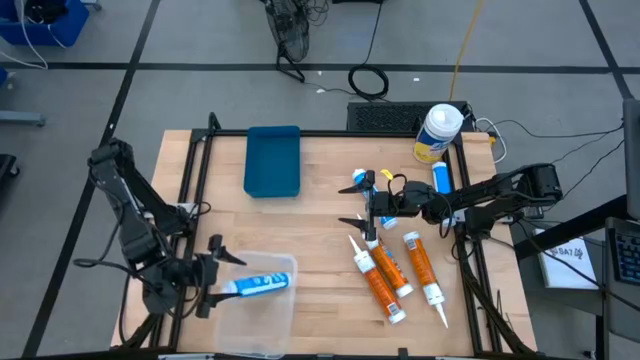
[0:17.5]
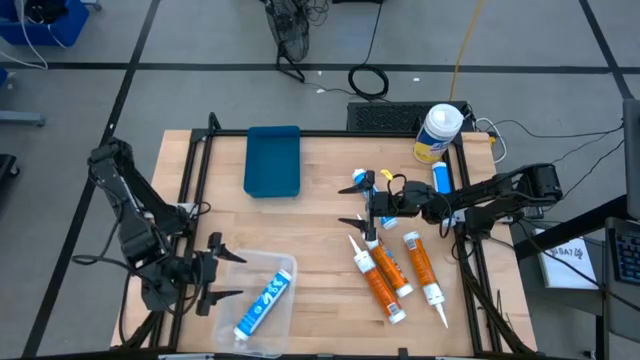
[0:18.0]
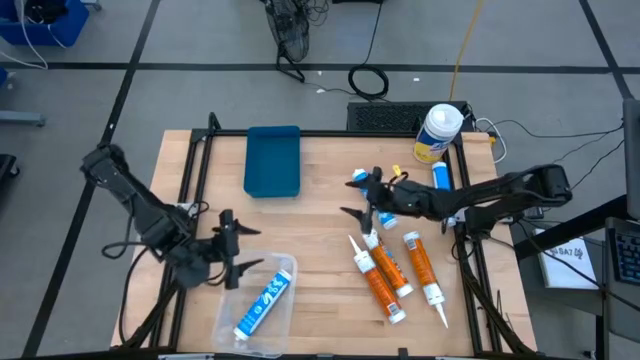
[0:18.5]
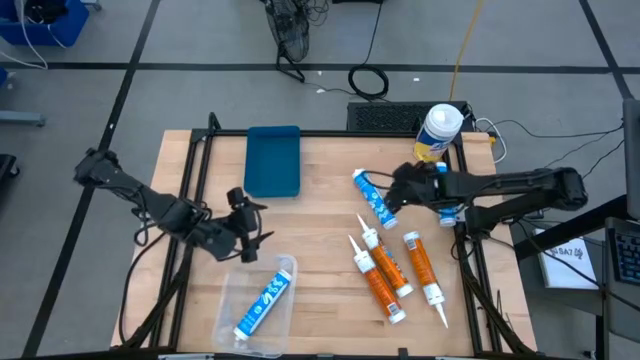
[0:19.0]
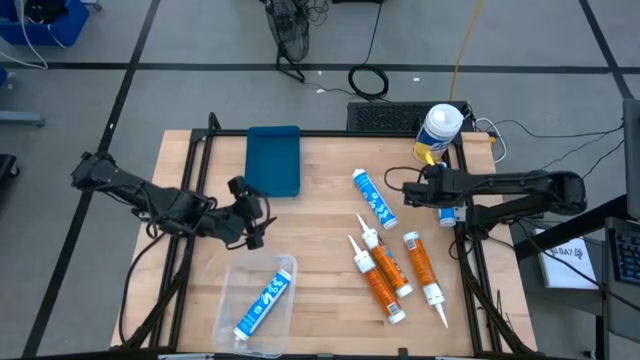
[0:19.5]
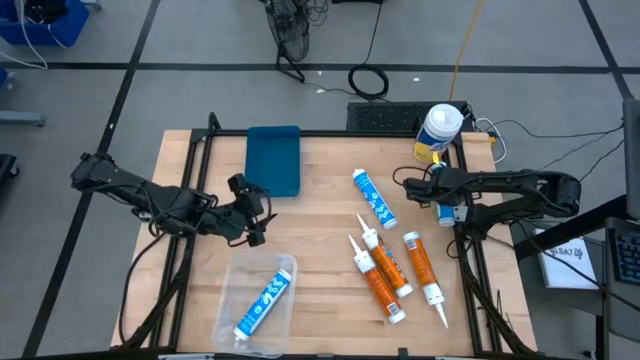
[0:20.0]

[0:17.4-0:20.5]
Task: Pick & place silicon tubes, Sealant and Lysol wipes
Adjust the right blue sealant

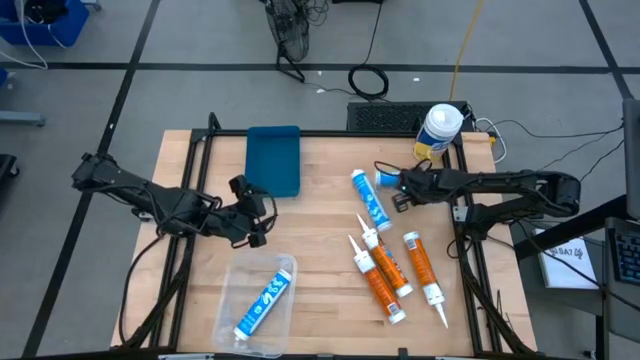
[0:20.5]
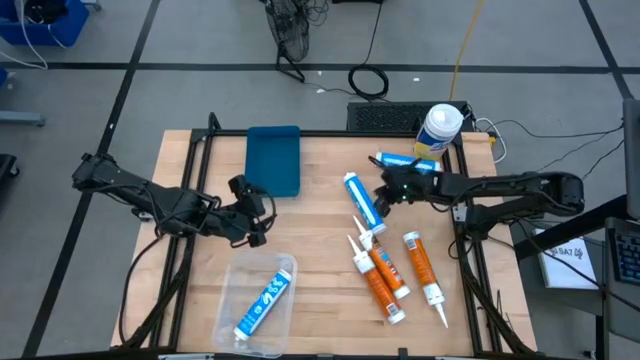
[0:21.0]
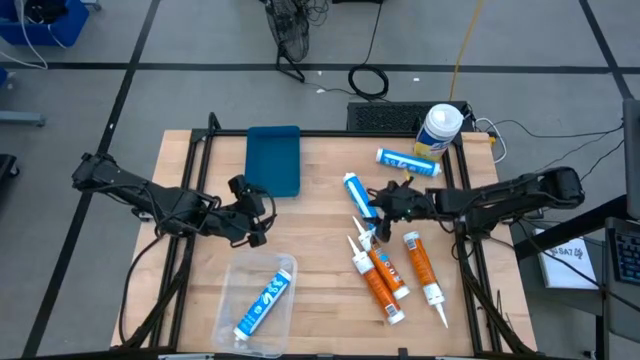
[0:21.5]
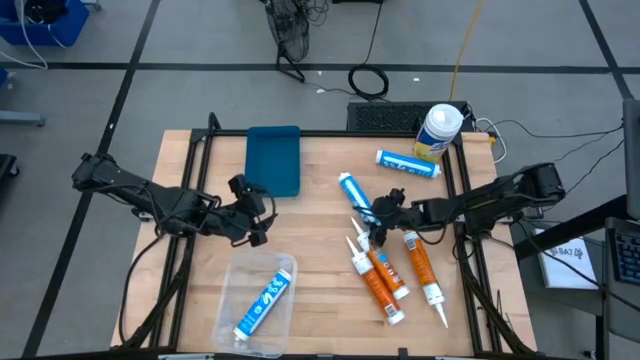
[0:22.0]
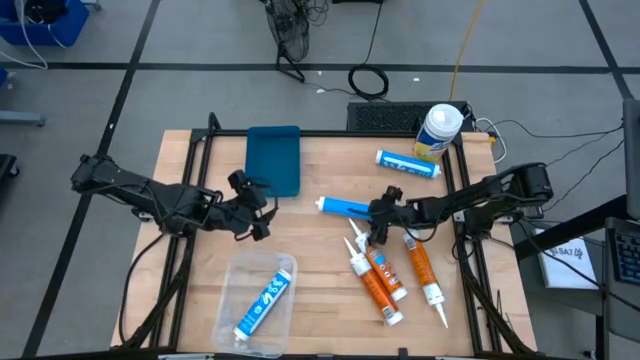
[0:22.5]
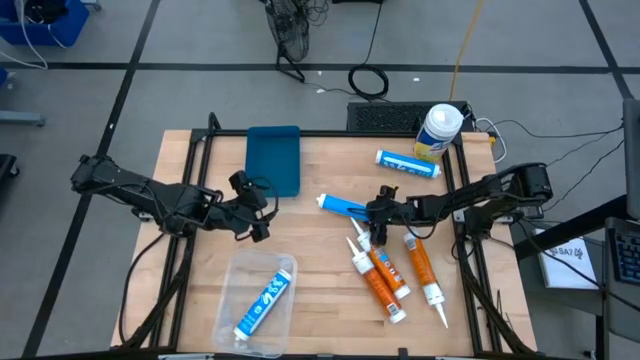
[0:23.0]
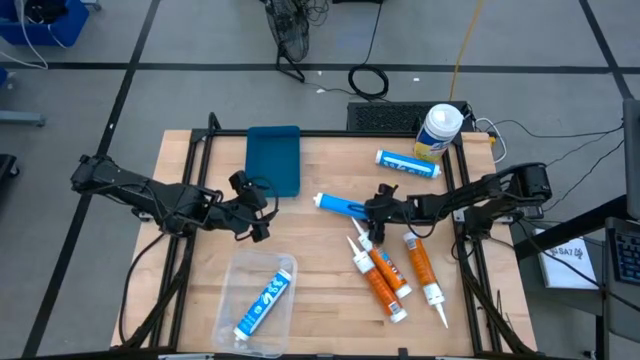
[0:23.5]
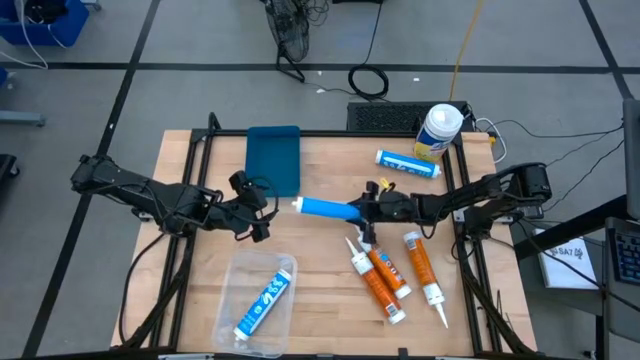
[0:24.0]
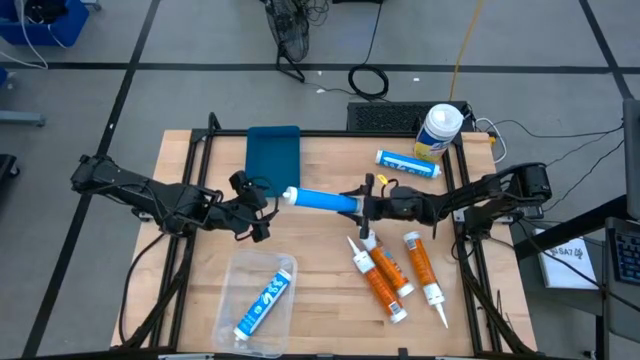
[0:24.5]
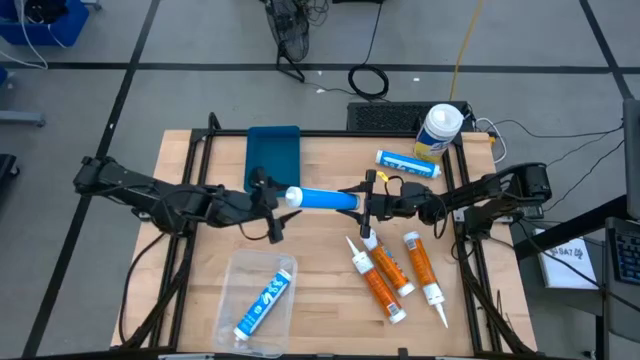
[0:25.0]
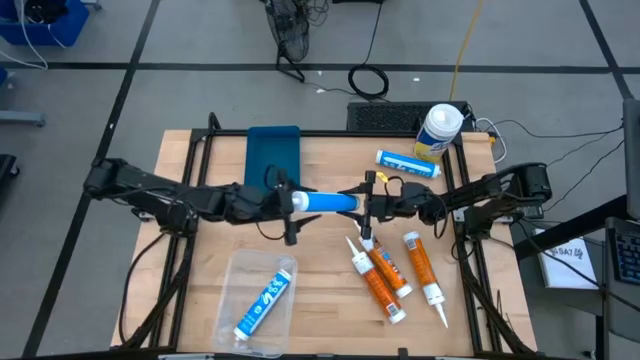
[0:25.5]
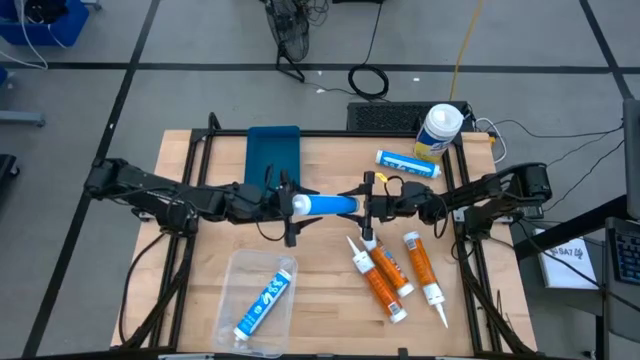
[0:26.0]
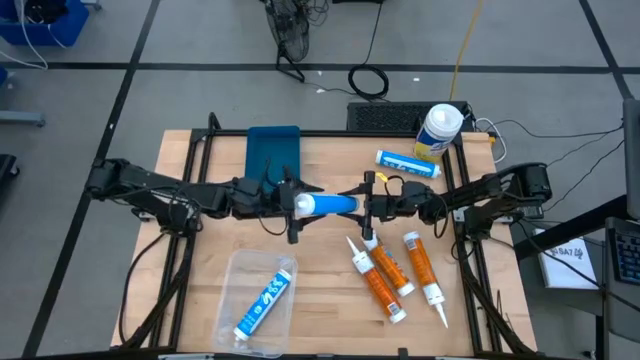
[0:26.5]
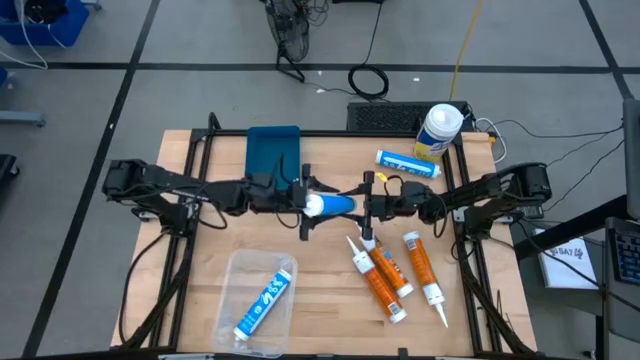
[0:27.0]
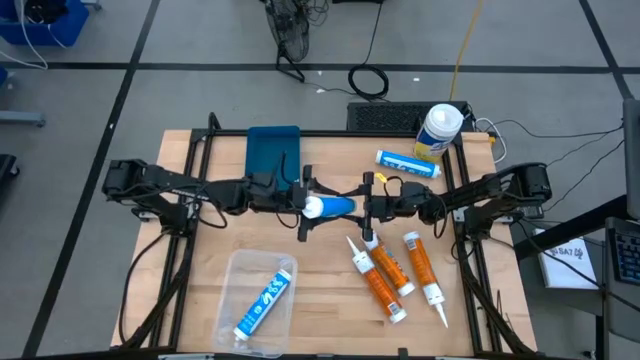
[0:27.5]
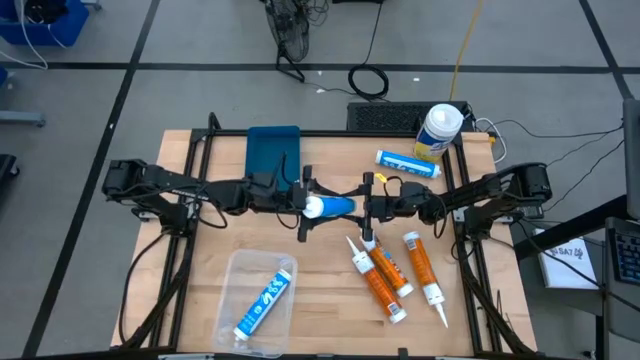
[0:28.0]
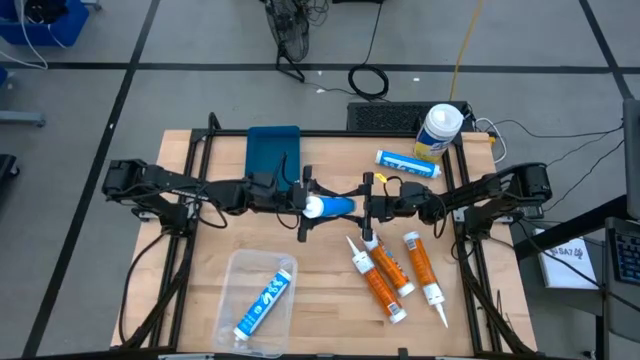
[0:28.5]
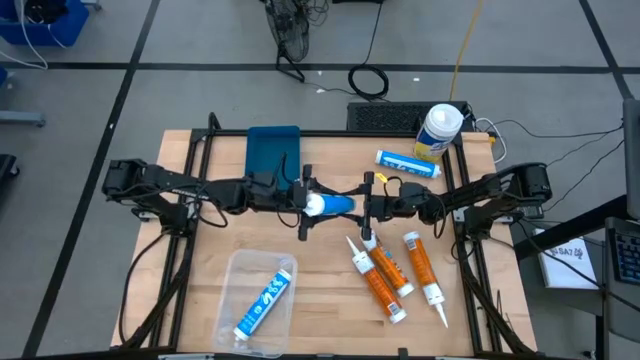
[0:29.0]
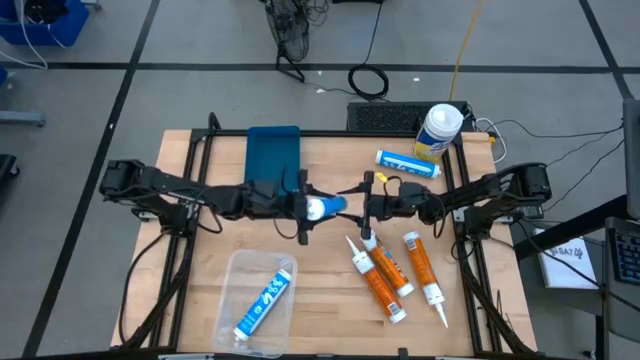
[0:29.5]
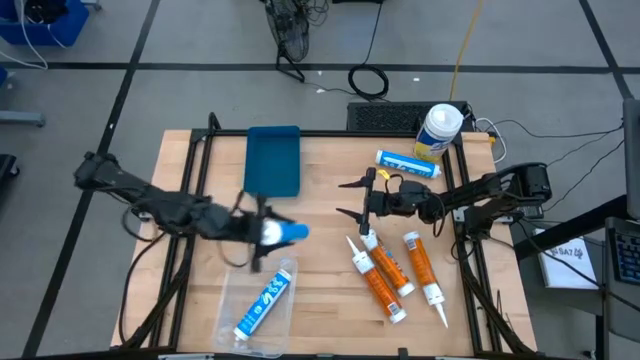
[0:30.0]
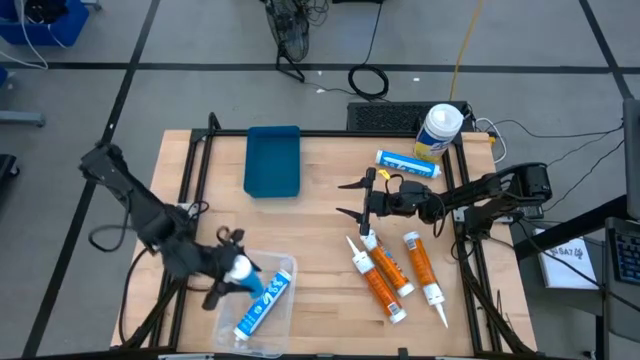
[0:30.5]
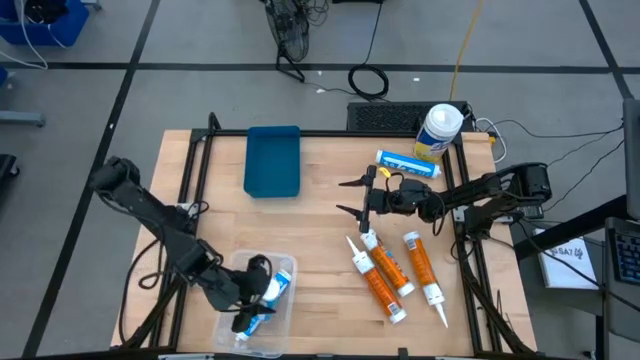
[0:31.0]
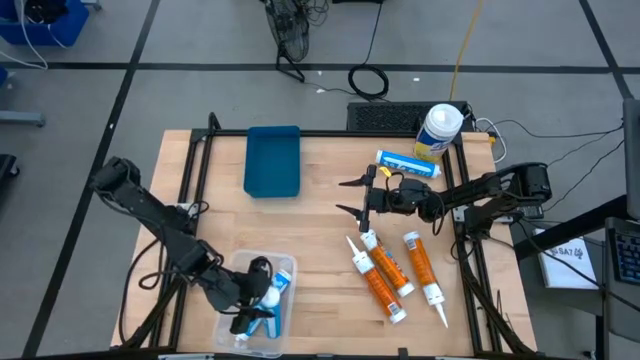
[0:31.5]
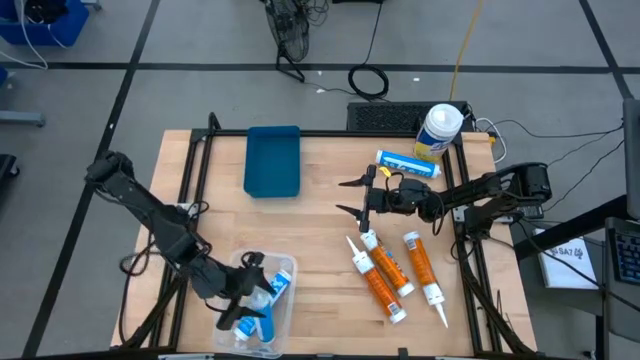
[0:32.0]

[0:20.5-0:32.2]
Put the bottom blue sealant into the transparent bin

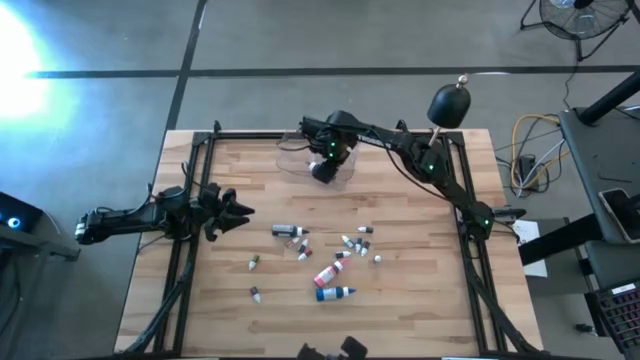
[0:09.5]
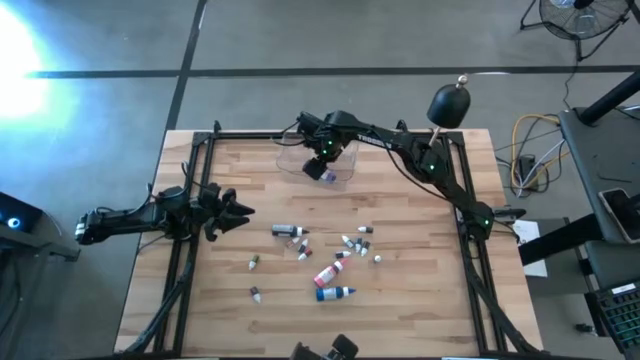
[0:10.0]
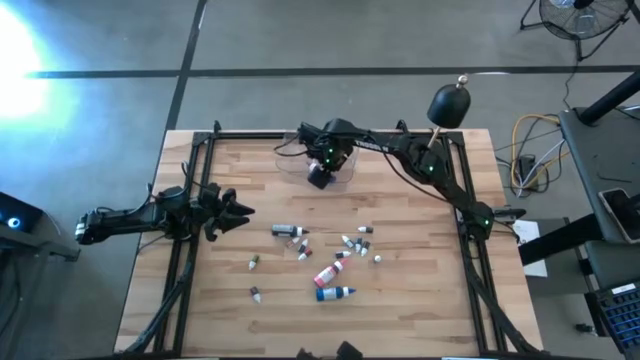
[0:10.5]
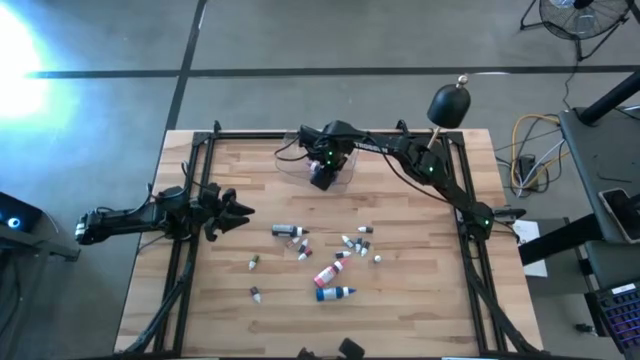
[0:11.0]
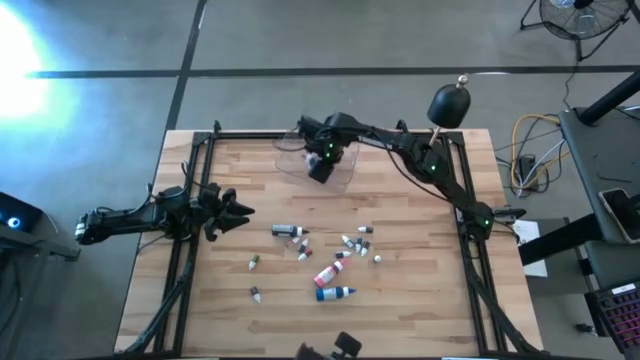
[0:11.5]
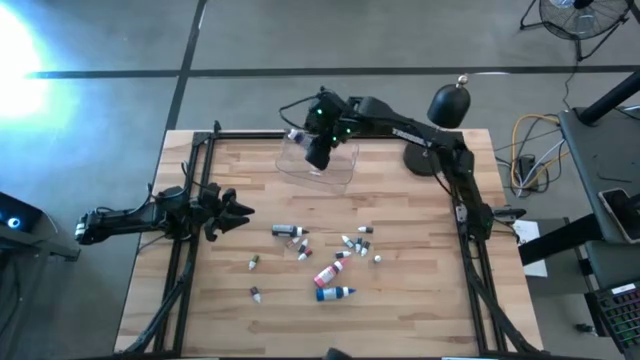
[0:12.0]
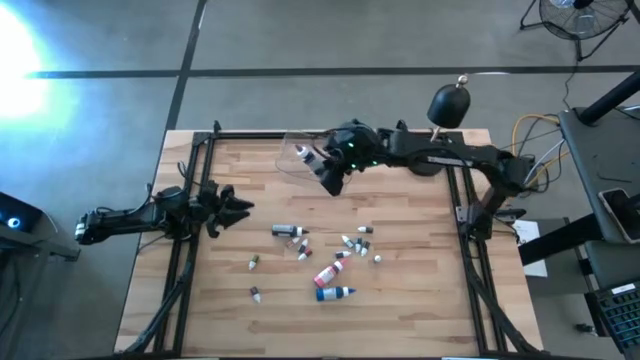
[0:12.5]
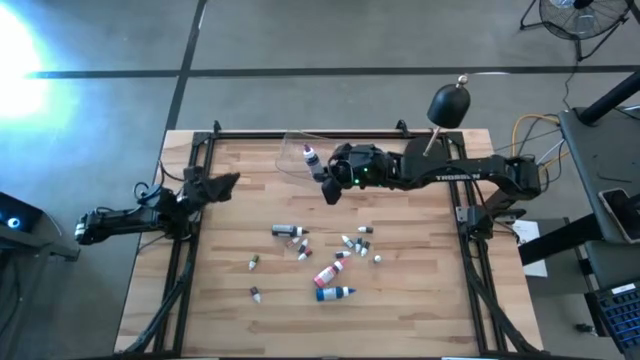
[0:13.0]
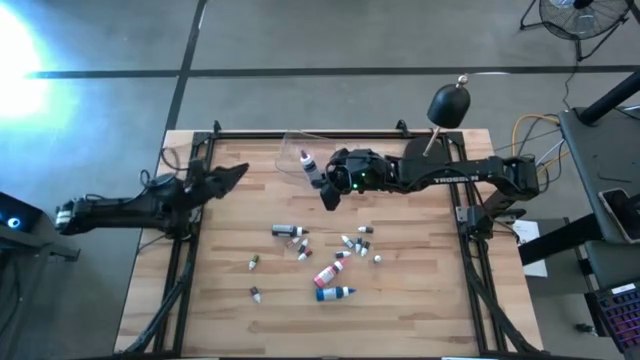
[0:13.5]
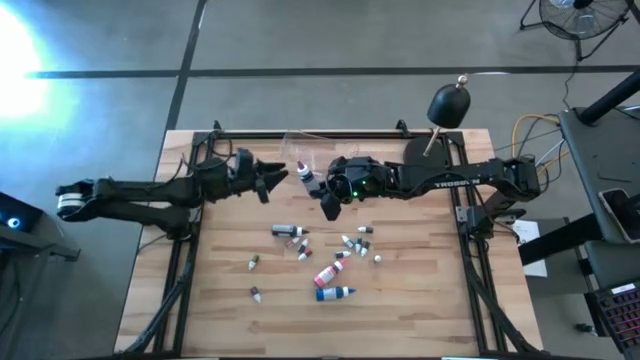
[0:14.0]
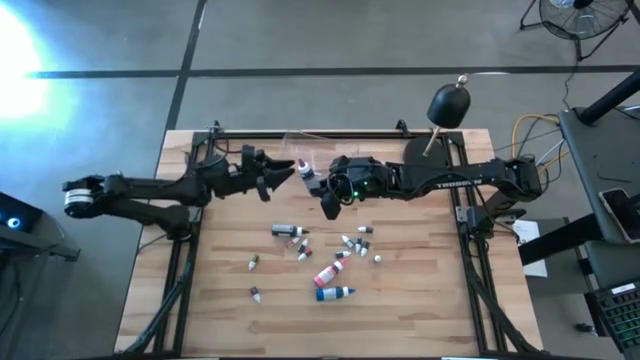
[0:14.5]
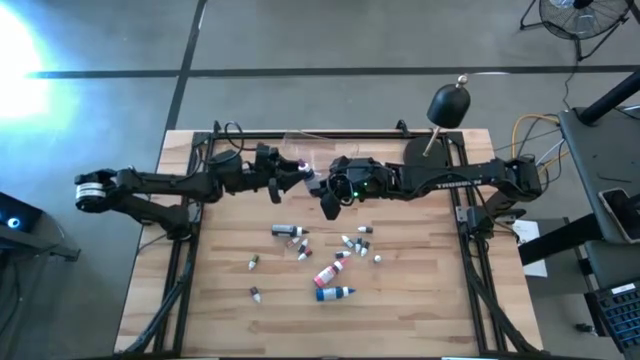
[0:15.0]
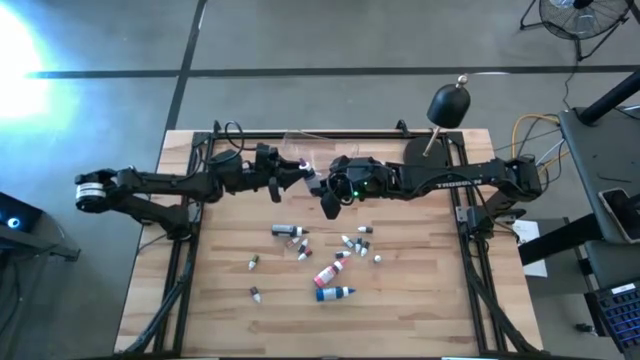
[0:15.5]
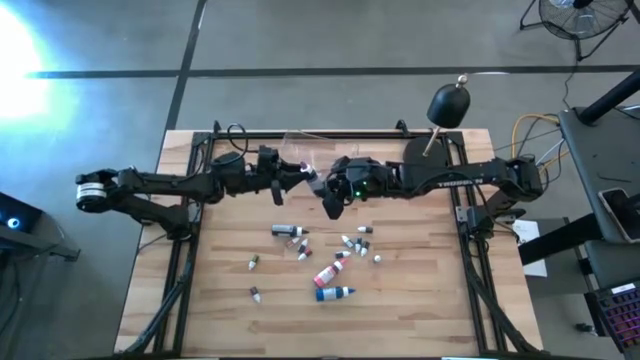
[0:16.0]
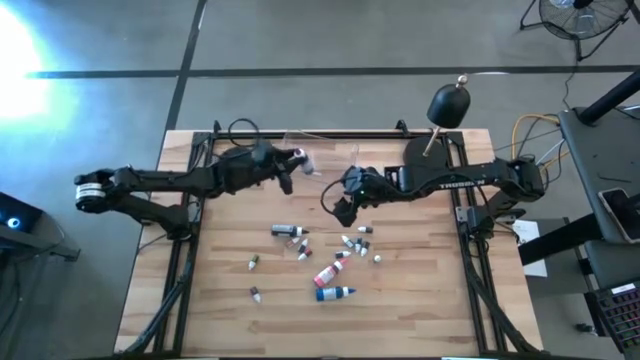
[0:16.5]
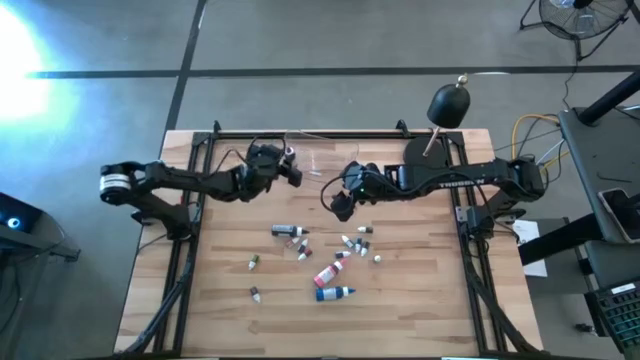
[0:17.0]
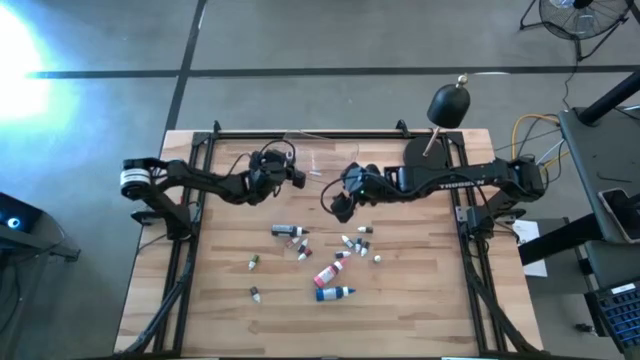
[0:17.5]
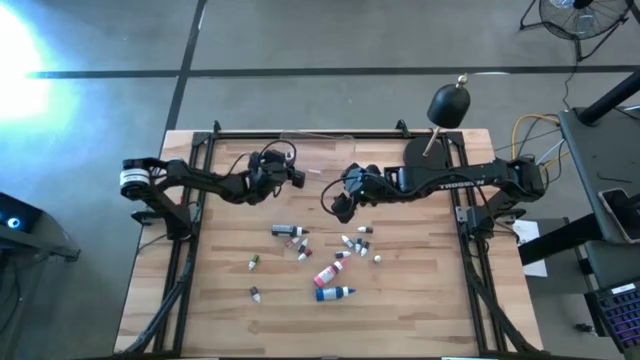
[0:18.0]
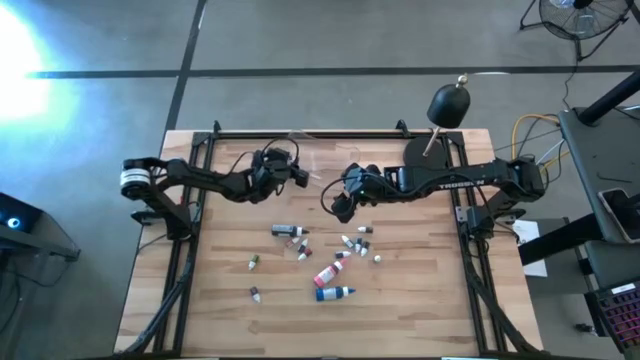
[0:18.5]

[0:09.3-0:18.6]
Task: Pick & Place food coloring
Put the large violet food coloring bottle into the transparent bin
